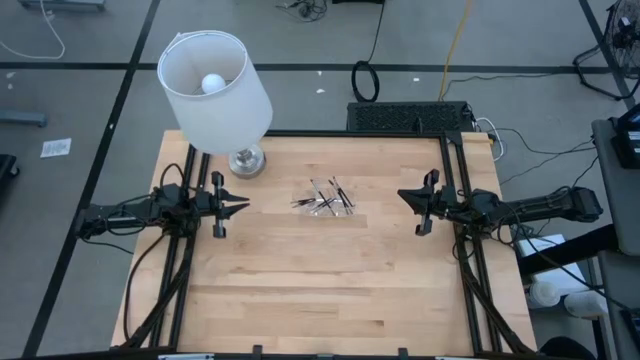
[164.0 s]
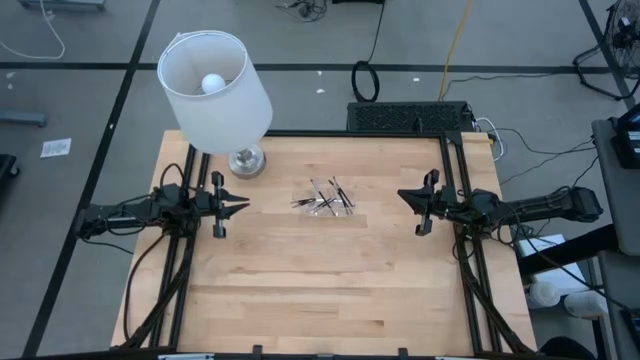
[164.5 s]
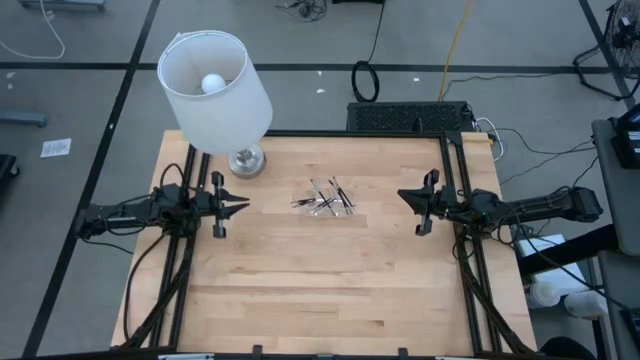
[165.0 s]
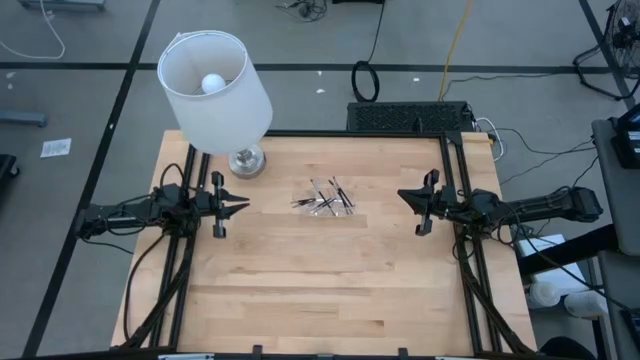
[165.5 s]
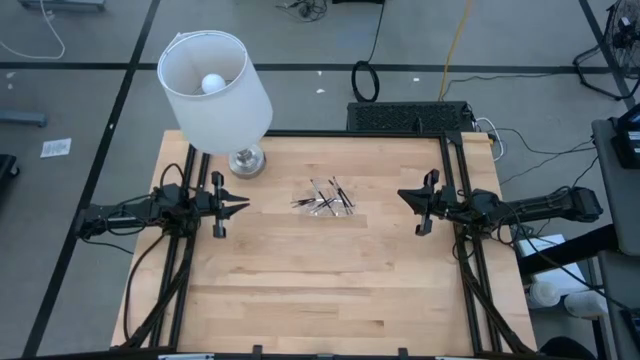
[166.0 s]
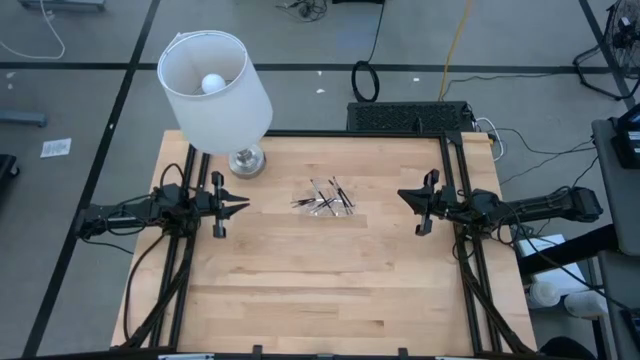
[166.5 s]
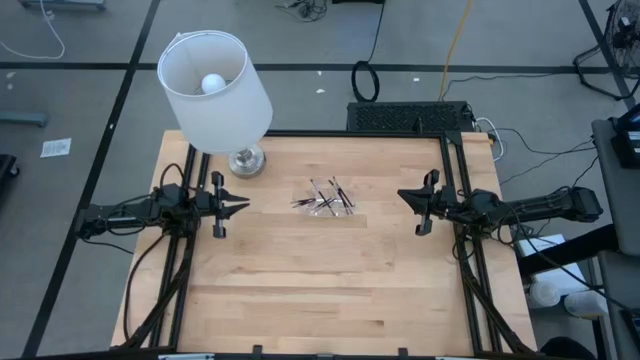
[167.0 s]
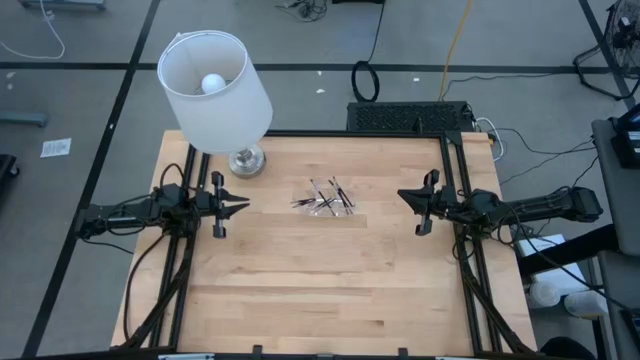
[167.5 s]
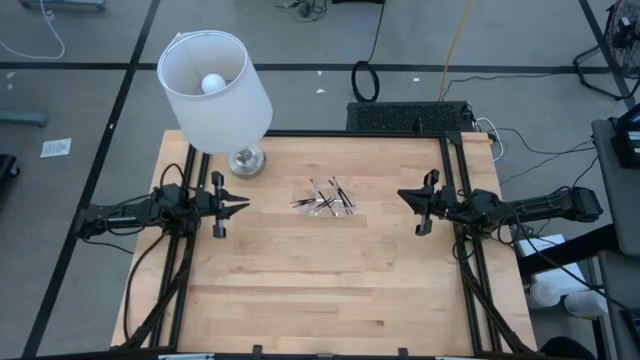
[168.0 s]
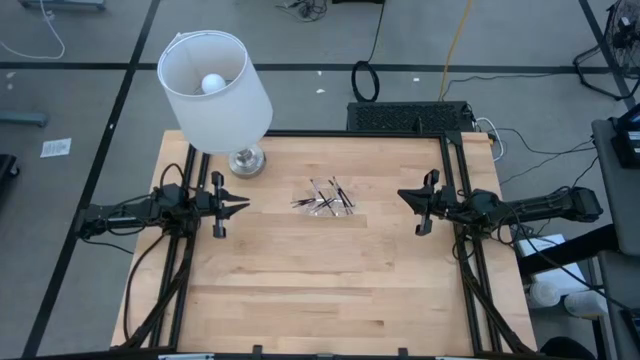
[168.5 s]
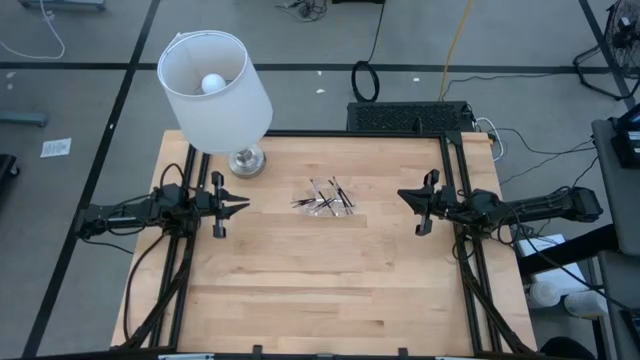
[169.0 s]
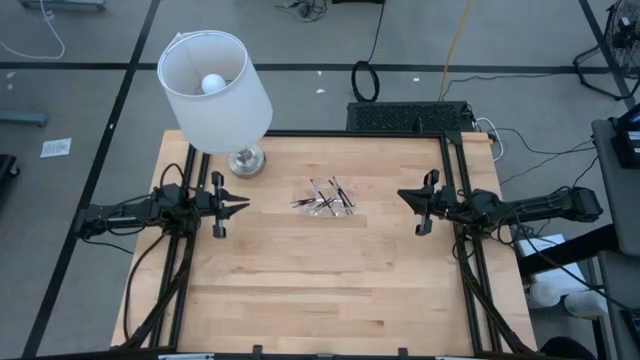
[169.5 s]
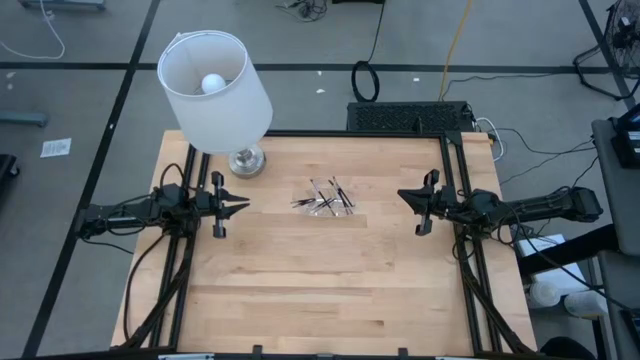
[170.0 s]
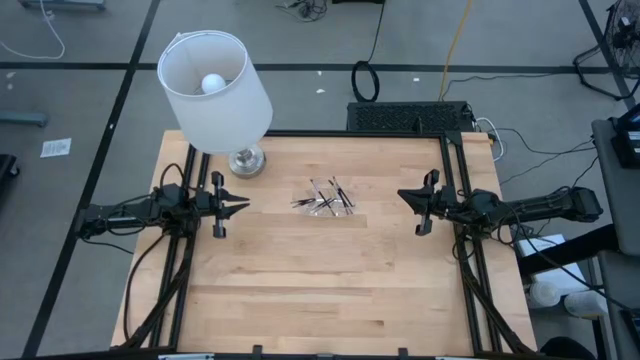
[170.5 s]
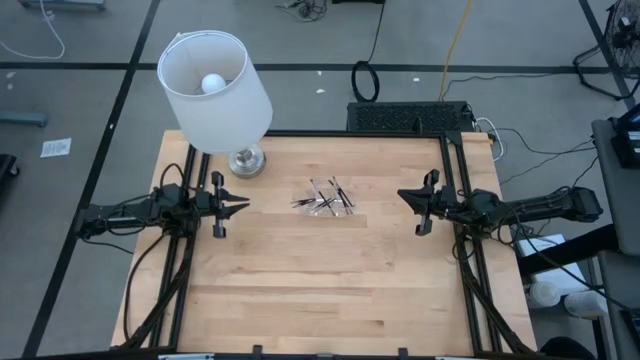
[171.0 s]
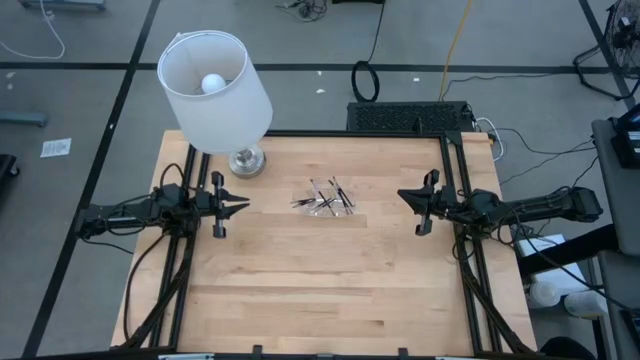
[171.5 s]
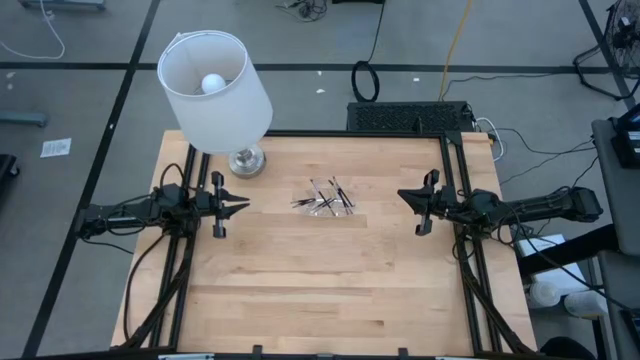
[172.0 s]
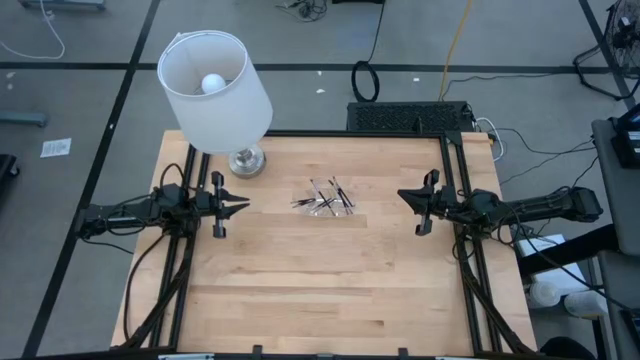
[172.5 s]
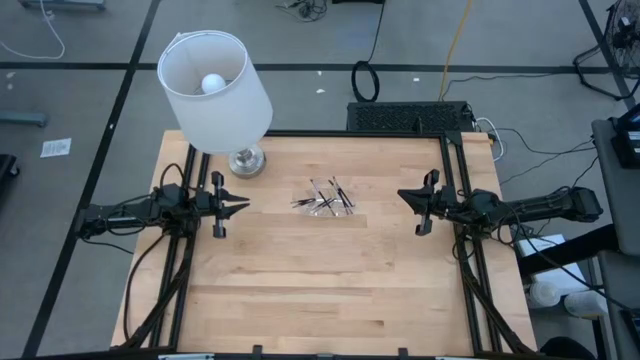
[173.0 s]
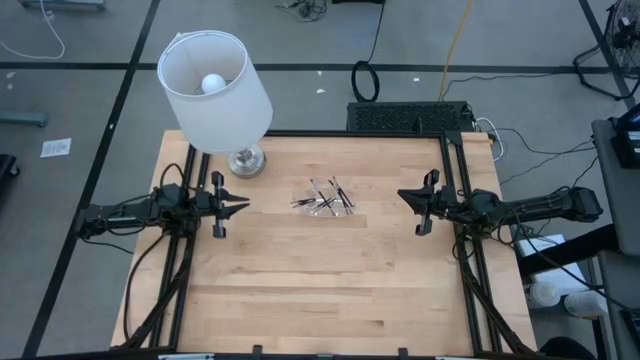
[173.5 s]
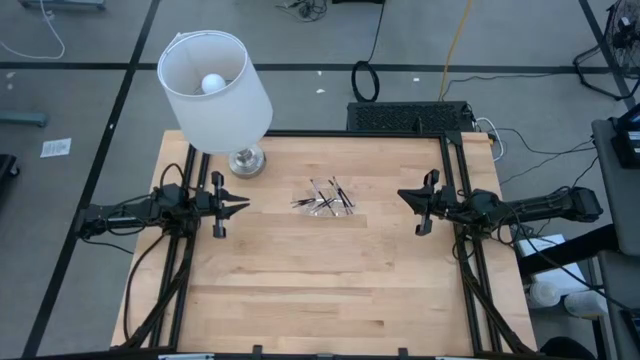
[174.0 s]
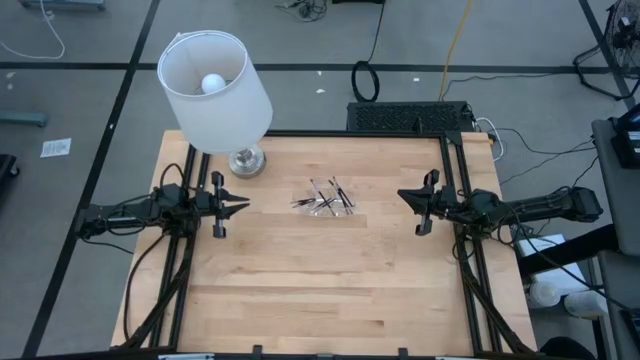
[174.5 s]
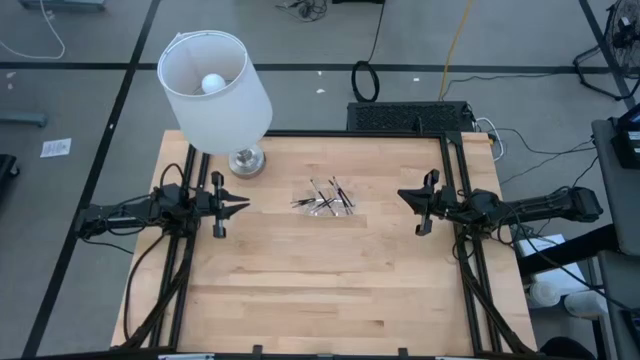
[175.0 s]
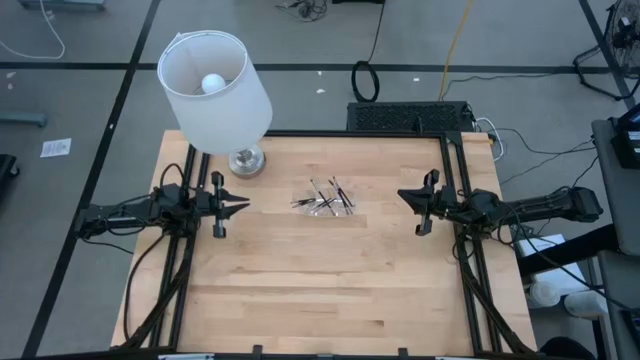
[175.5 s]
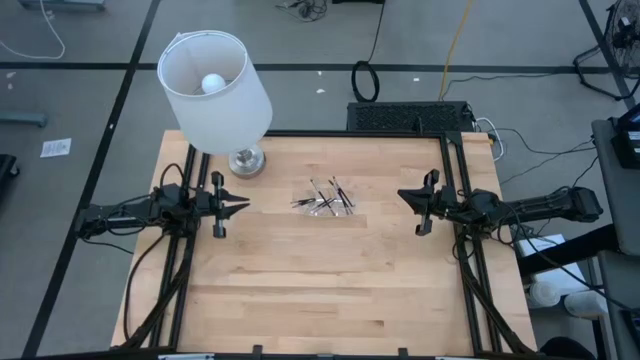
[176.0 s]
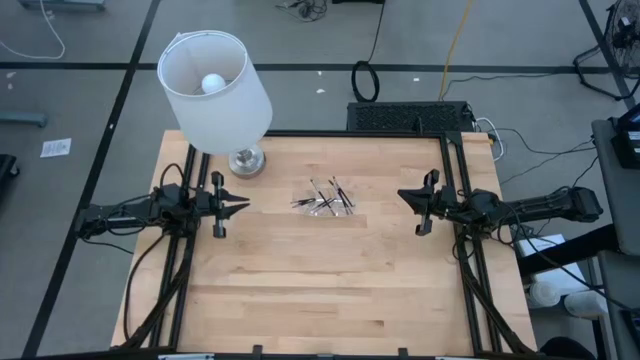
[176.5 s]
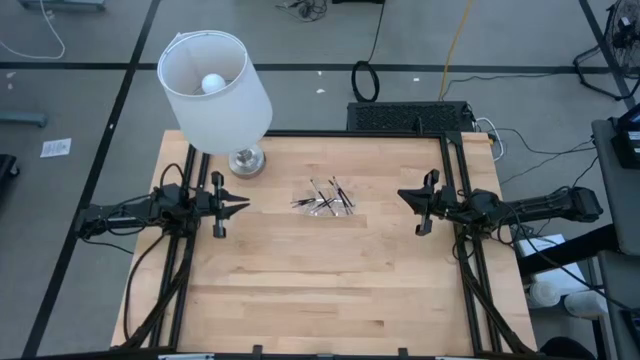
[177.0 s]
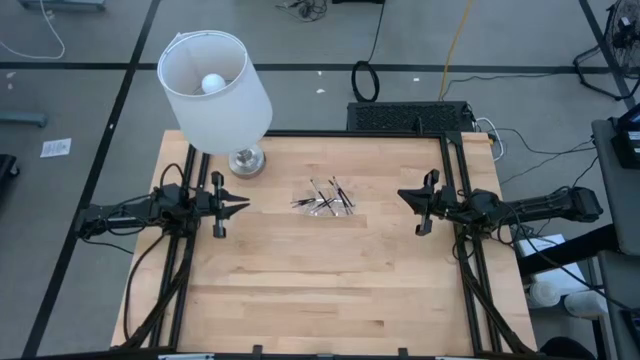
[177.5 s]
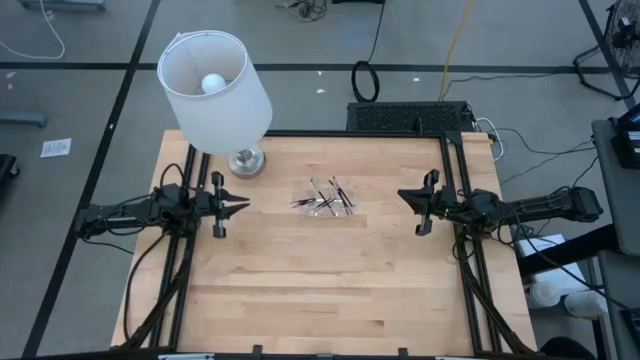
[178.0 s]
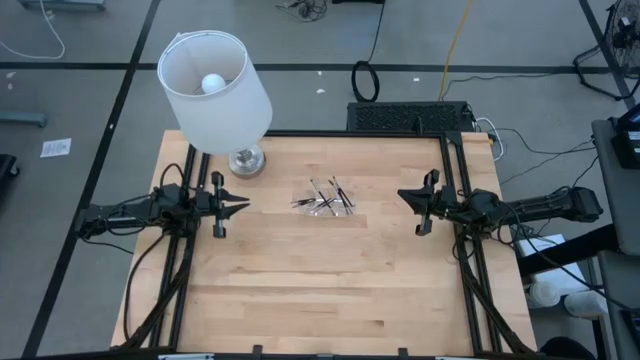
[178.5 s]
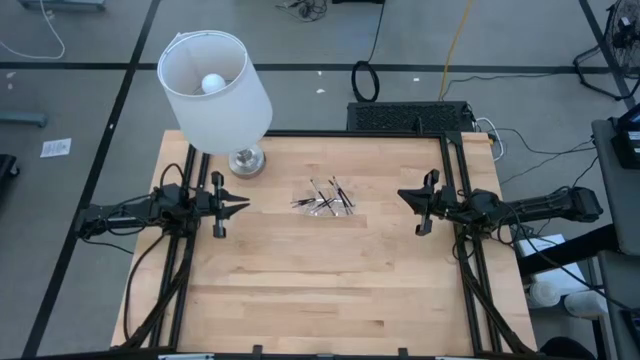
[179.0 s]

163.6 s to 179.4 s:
Task: Put items in baskets/containers
Return to Home Position

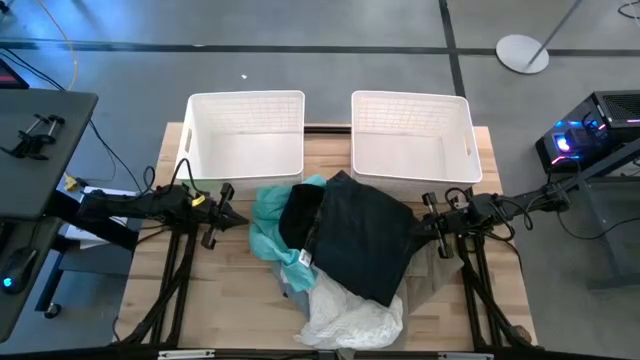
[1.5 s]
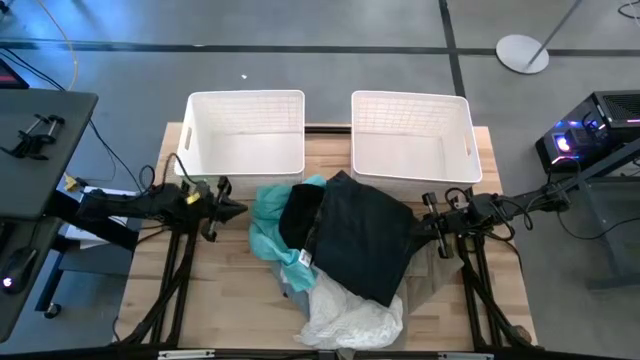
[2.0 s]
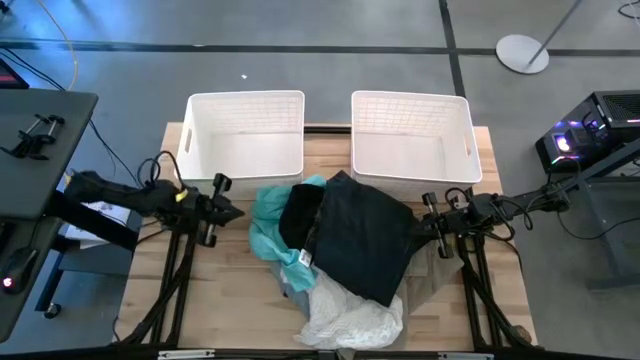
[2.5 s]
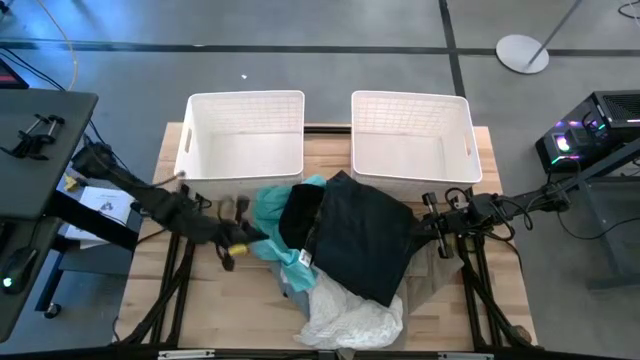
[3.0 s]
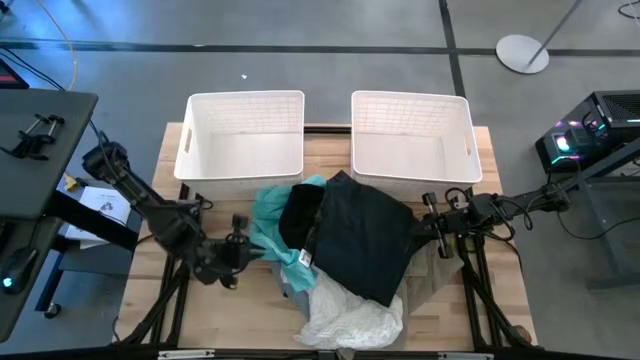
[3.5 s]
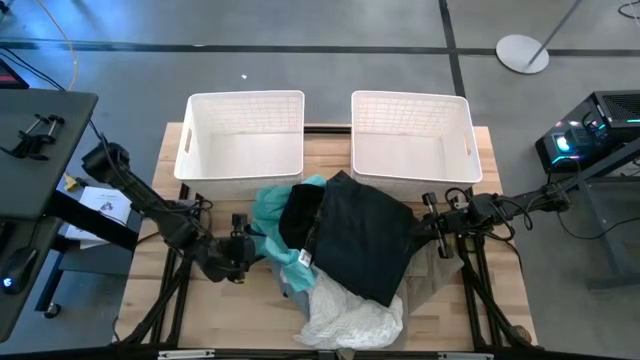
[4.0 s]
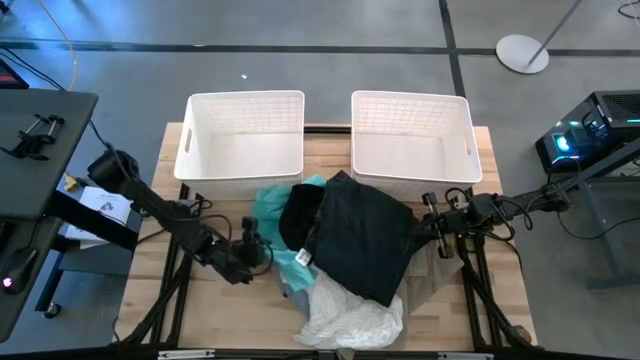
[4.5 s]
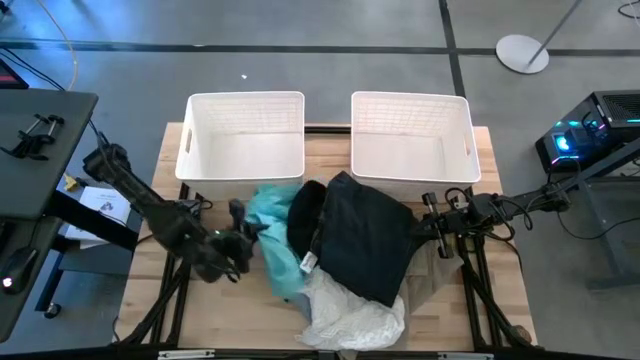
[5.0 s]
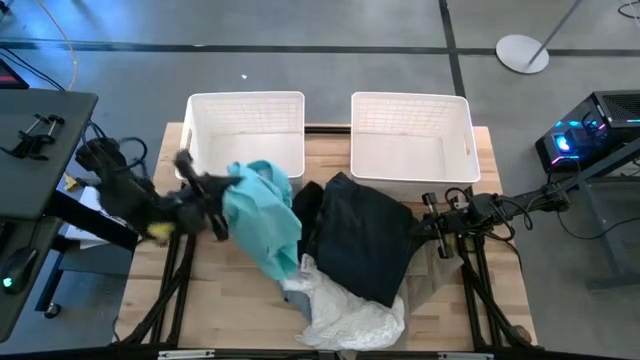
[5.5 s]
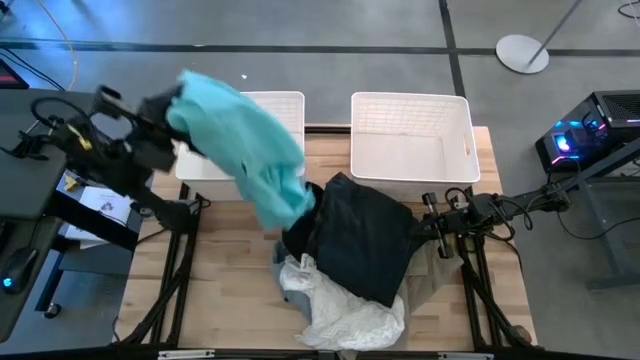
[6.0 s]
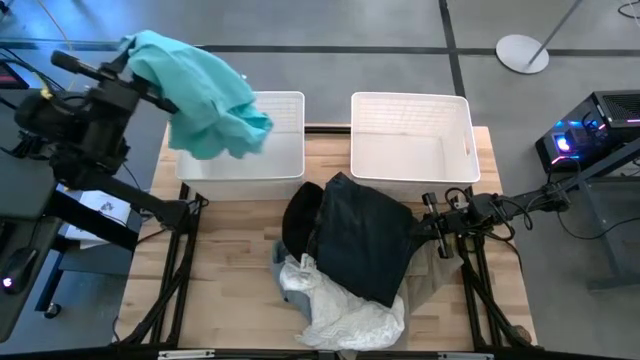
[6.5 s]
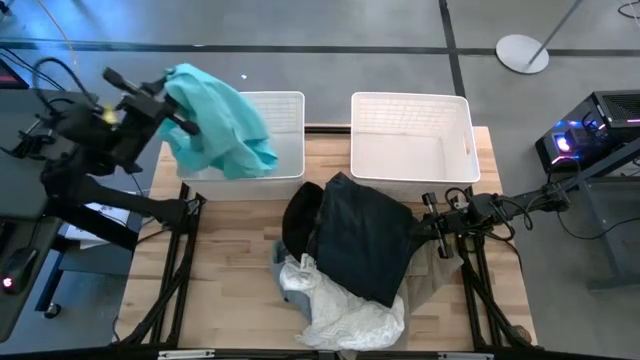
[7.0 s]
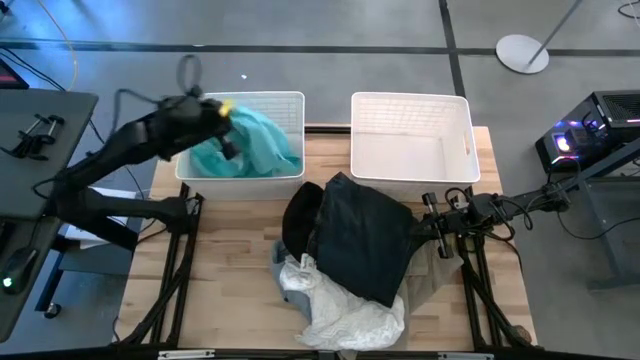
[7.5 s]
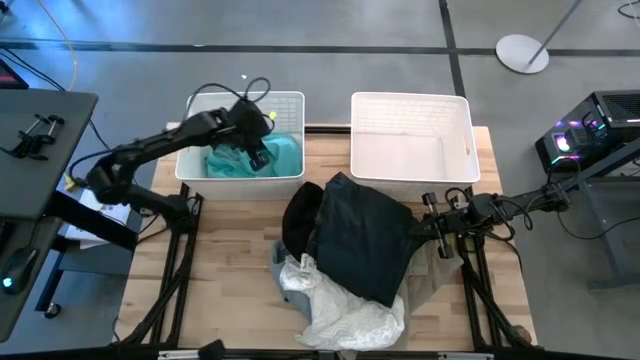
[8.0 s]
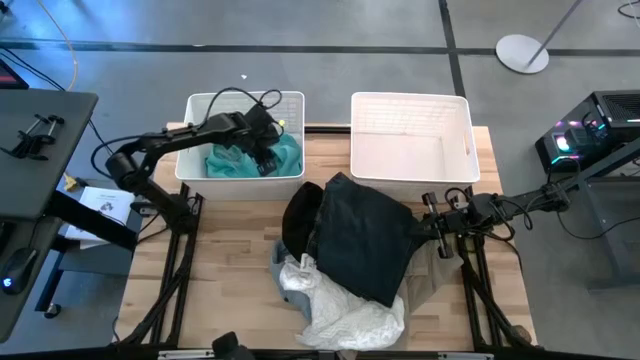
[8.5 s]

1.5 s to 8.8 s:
Task: Sort clothes
Put the light blue shorts into the left white laundry bin
